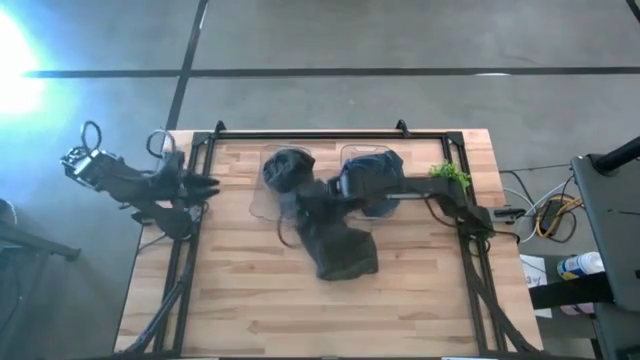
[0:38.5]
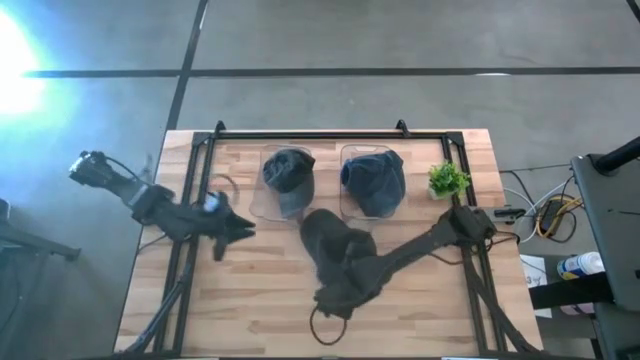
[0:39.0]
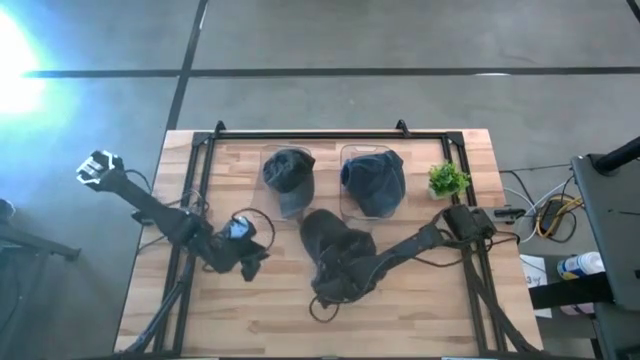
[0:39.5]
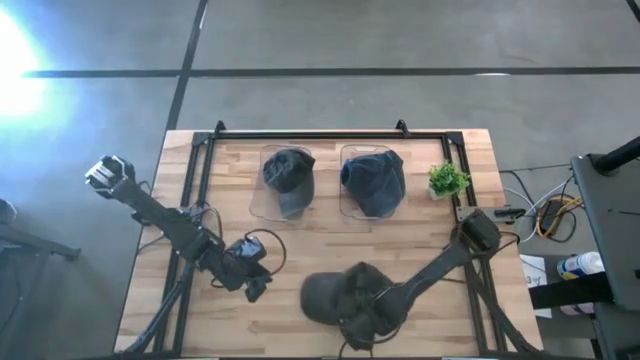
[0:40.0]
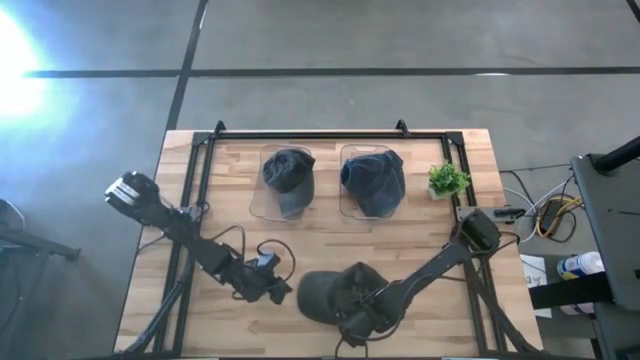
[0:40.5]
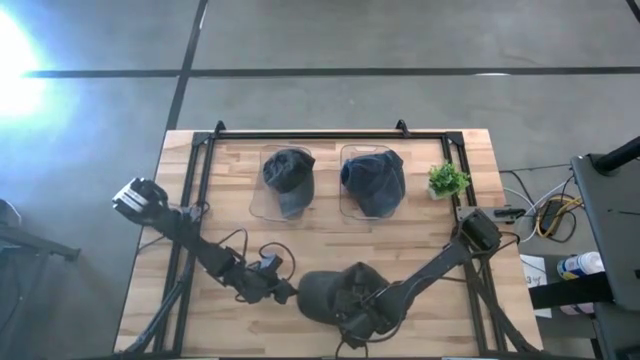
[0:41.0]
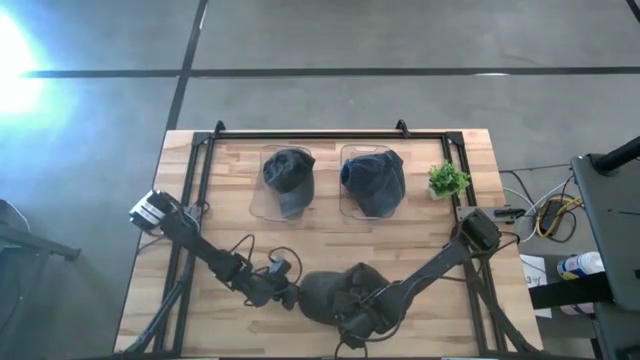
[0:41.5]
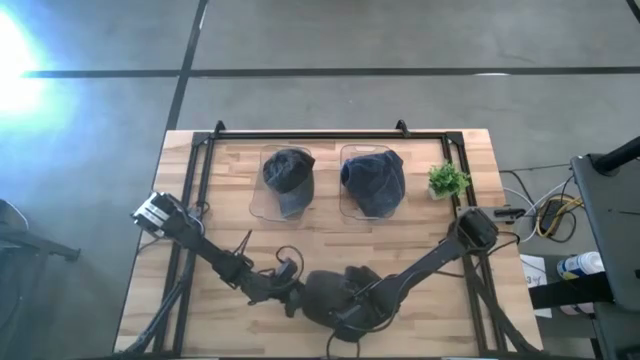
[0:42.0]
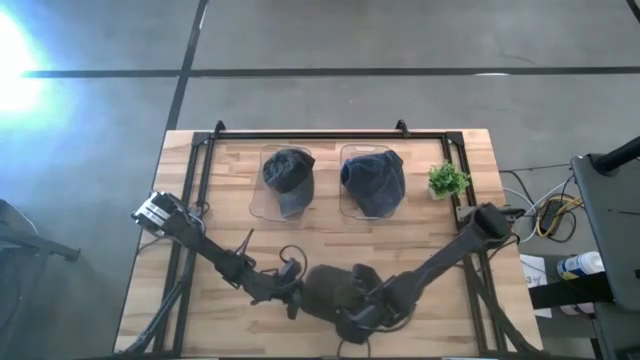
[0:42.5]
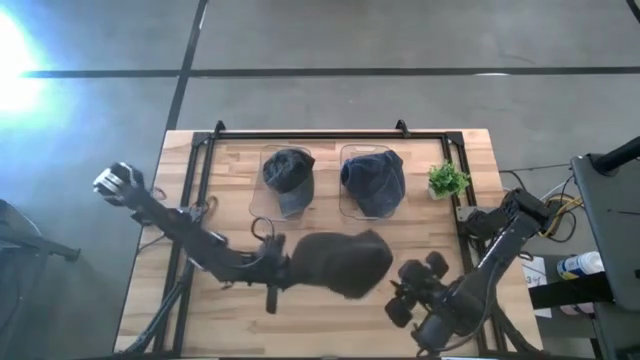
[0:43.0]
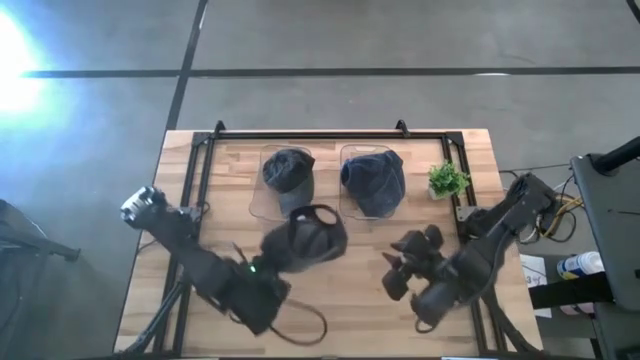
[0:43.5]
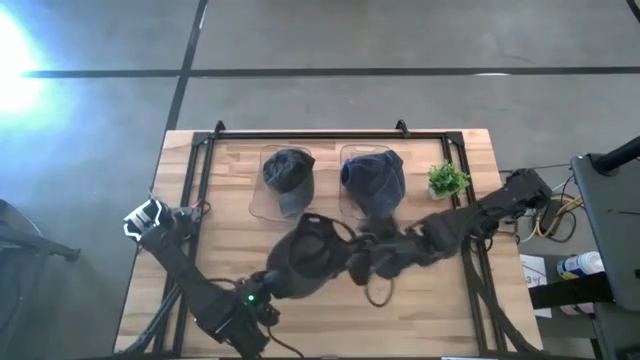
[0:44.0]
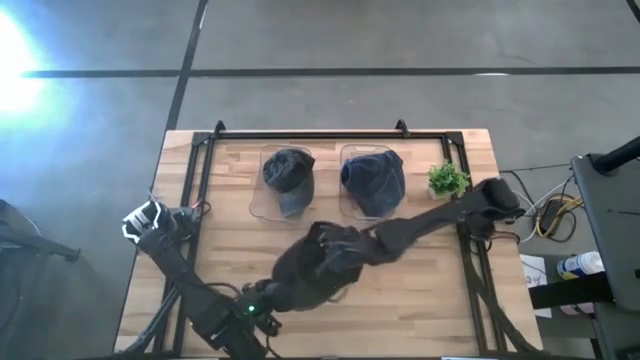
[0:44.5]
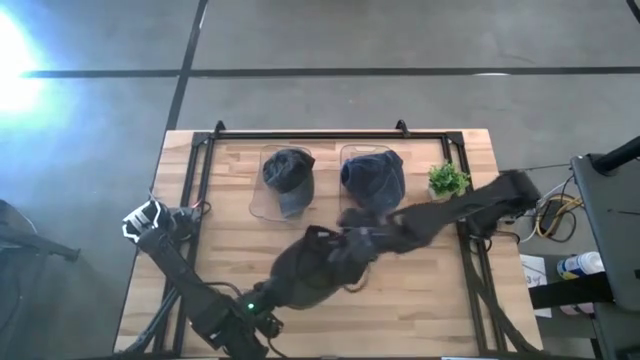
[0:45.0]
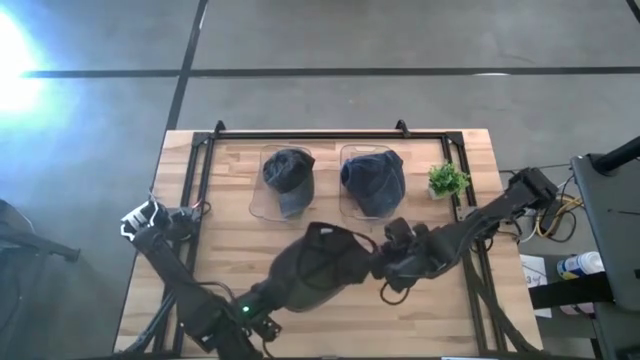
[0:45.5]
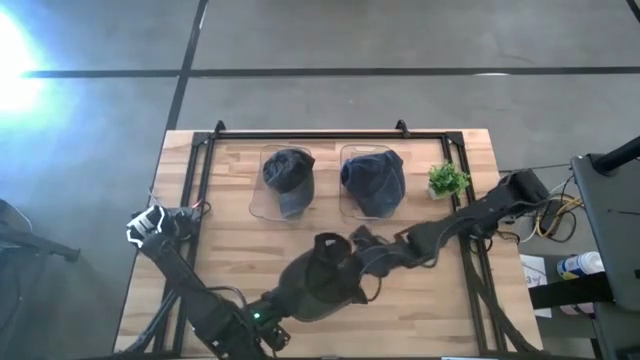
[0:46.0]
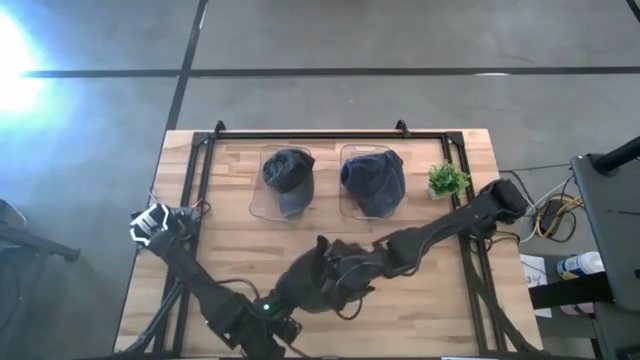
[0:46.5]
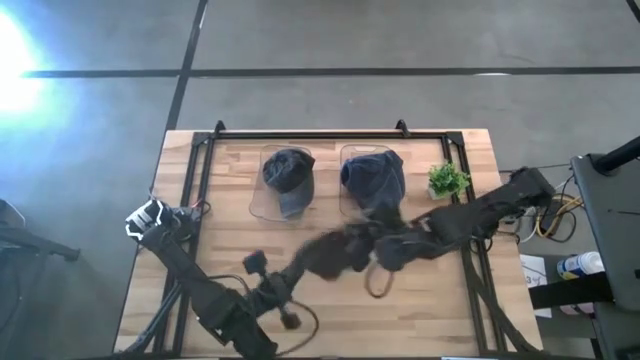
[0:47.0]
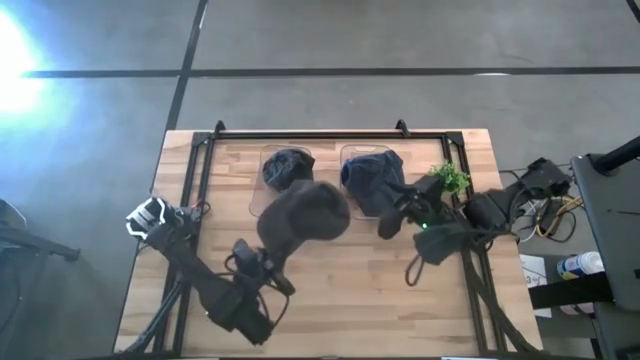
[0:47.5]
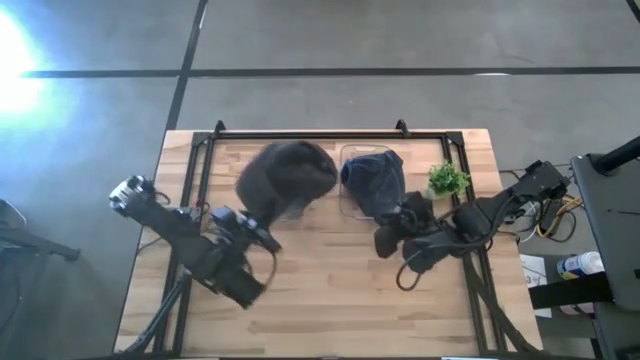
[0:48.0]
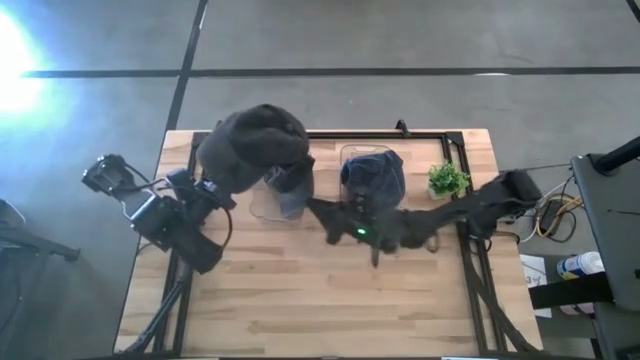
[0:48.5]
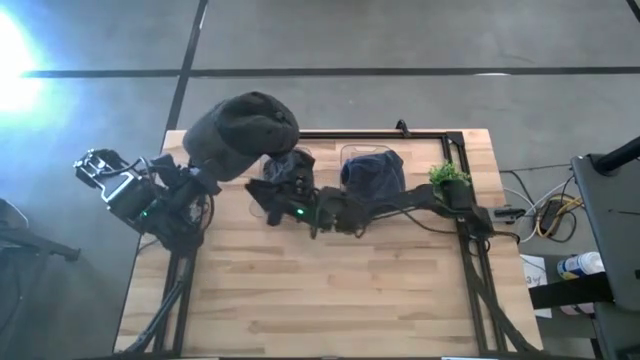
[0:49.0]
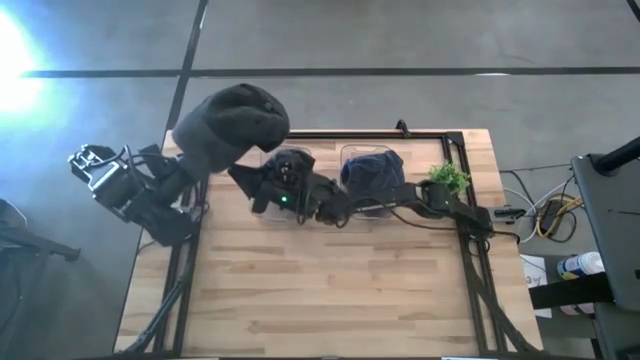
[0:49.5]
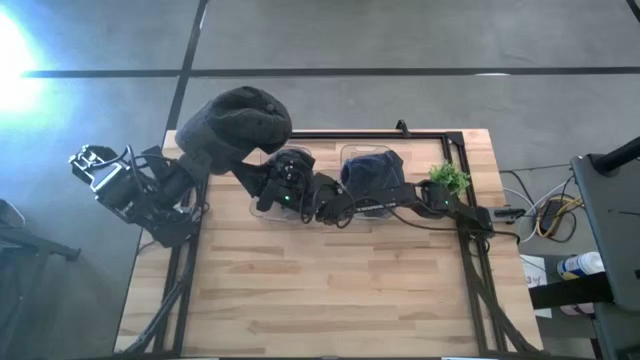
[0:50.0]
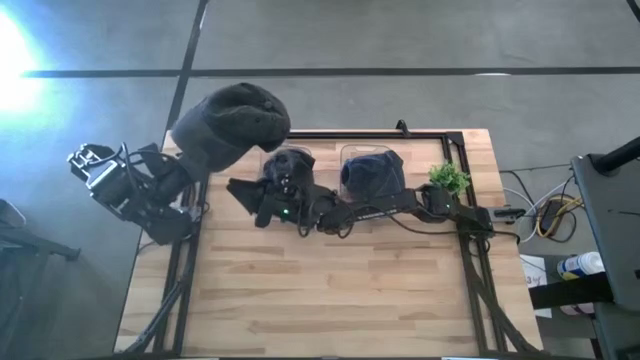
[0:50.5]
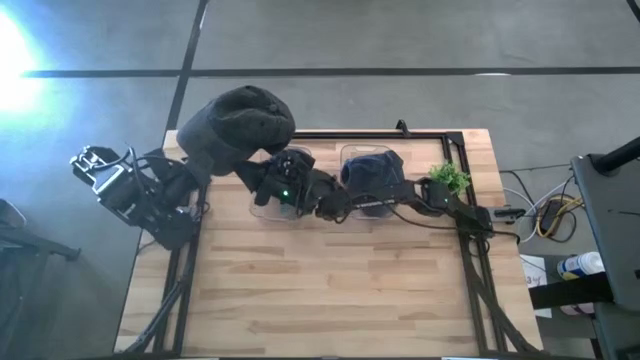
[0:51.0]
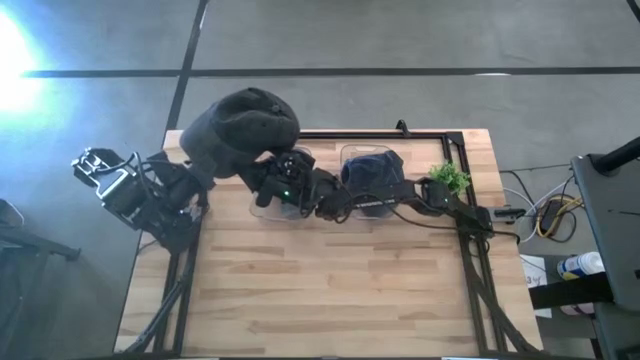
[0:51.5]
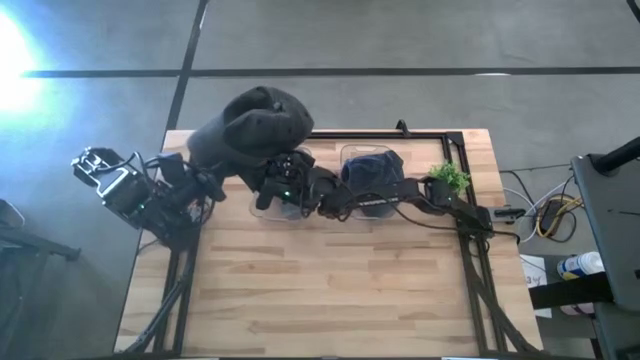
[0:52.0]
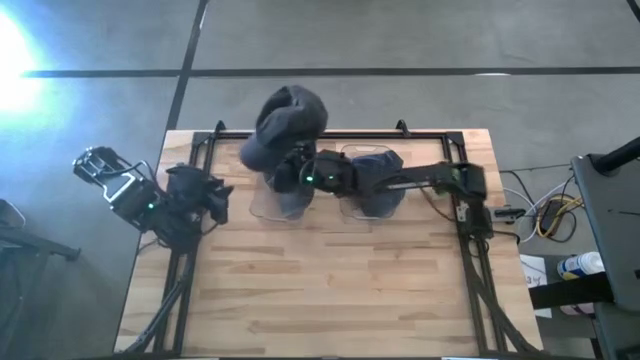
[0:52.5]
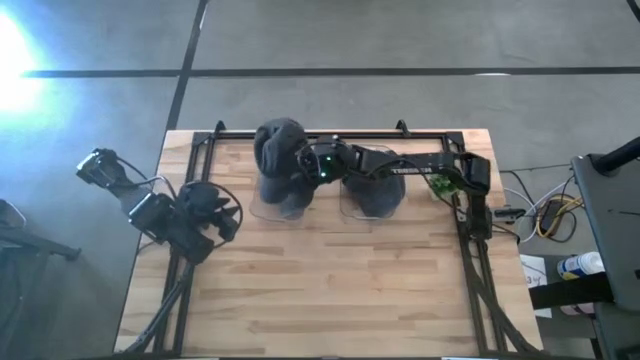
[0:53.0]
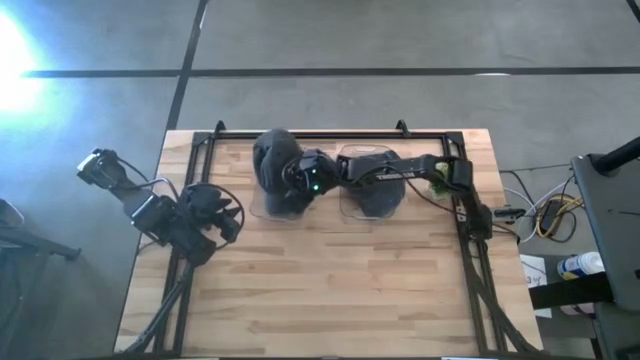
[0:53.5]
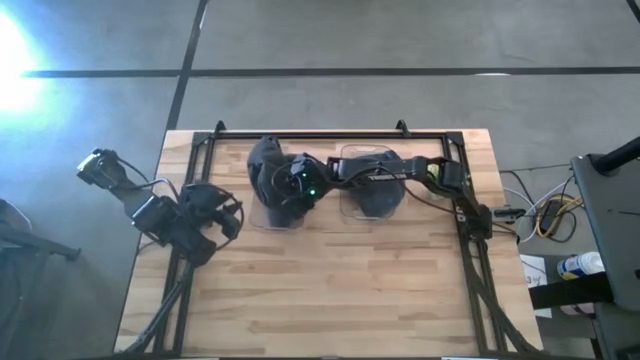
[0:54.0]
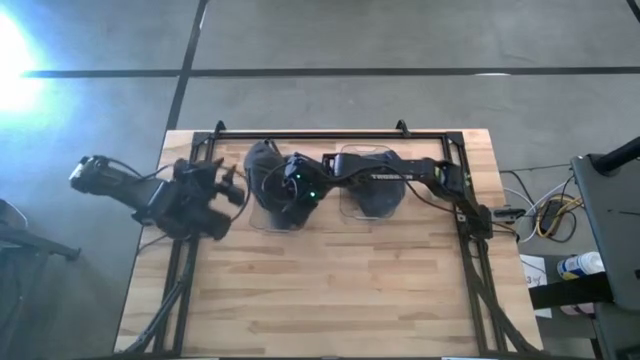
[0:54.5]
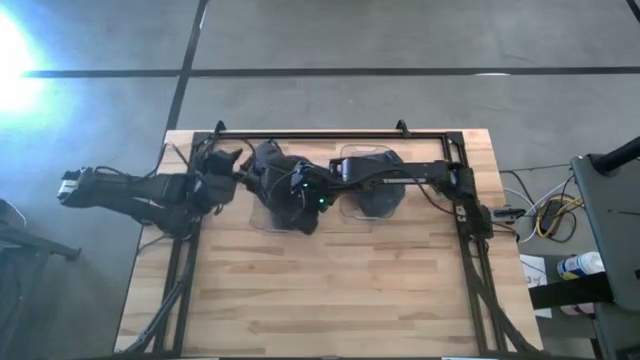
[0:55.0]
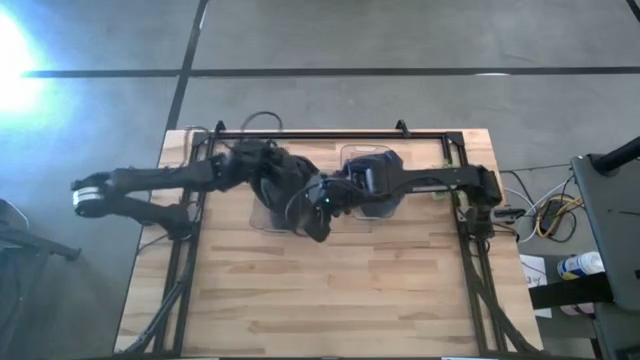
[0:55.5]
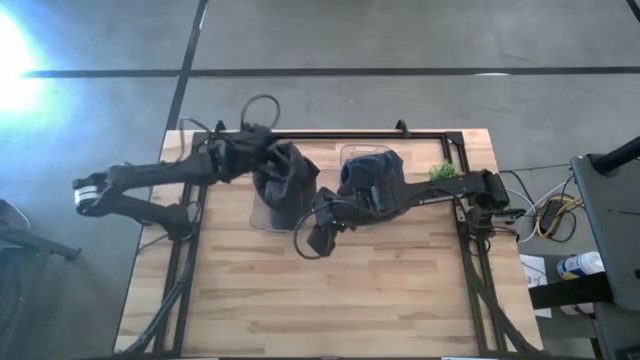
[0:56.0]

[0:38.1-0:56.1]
Task: Pick & Place hat
Put the black cap into the left transparent bin

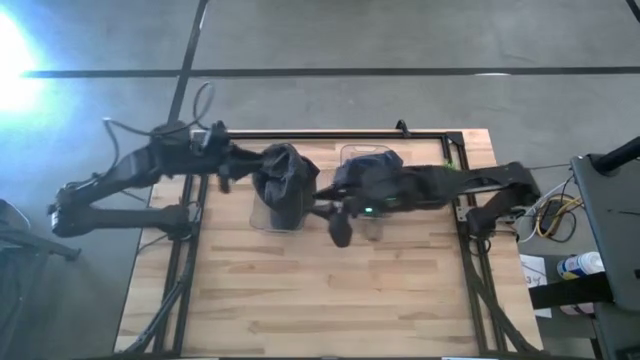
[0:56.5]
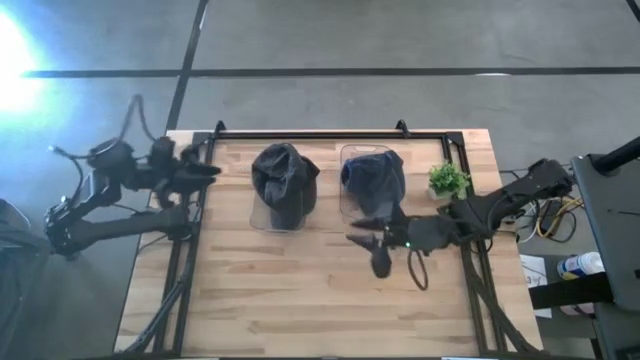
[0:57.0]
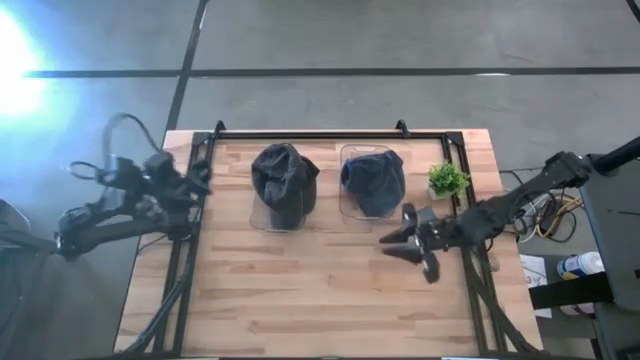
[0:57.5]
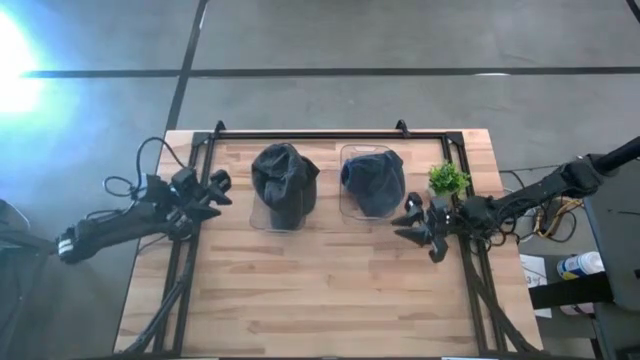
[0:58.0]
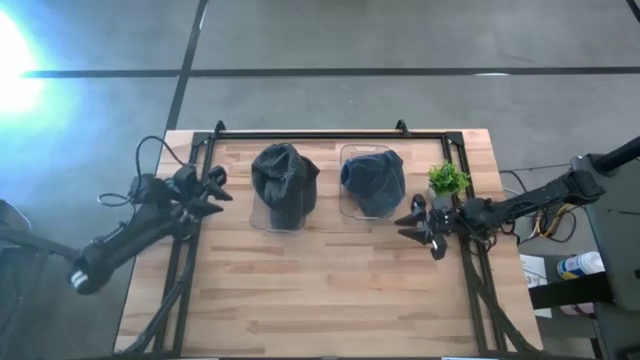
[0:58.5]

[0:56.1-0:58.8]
Return to Home Position

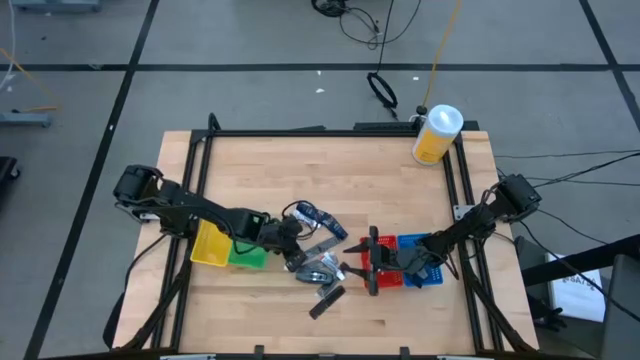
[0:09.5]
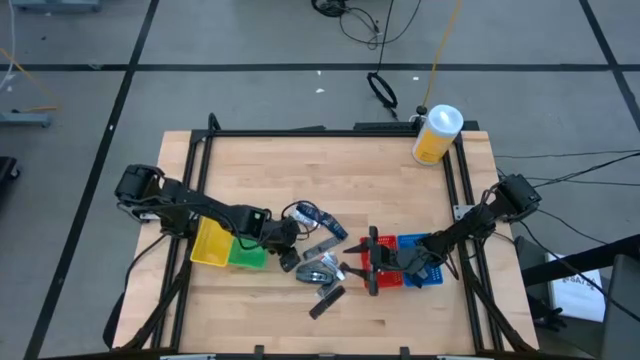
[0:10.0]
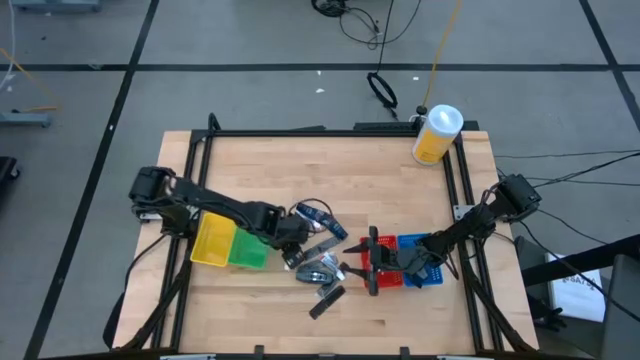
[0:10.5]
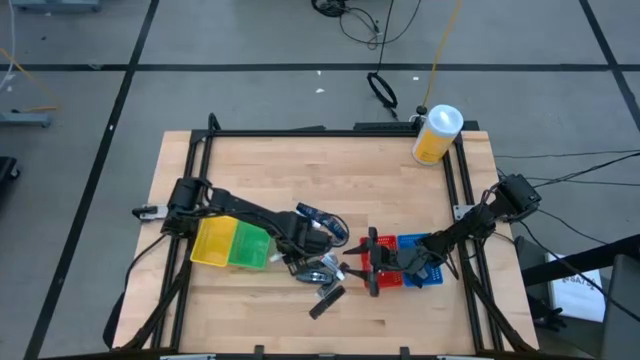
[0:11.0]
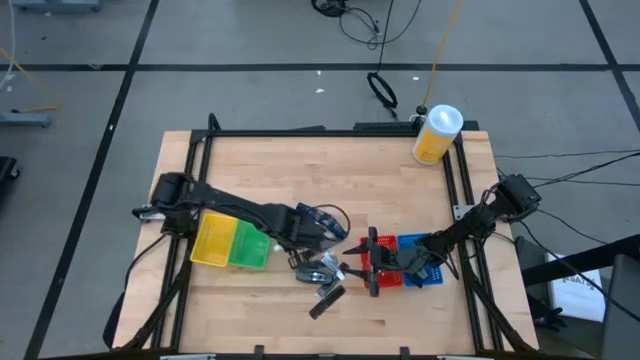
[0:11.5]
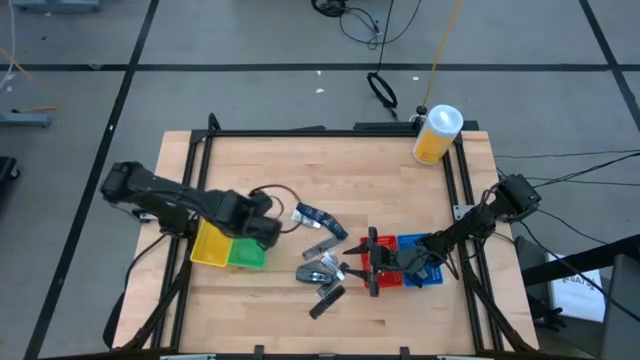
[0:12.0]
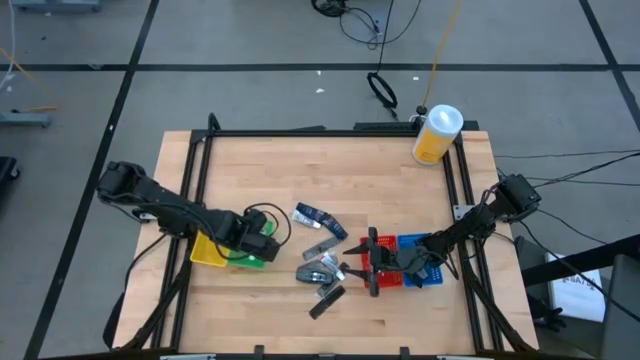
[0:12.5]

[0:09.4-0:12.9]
Task: Pick & Place Travel size toiletries
Put the white toothpaste into the green bin
